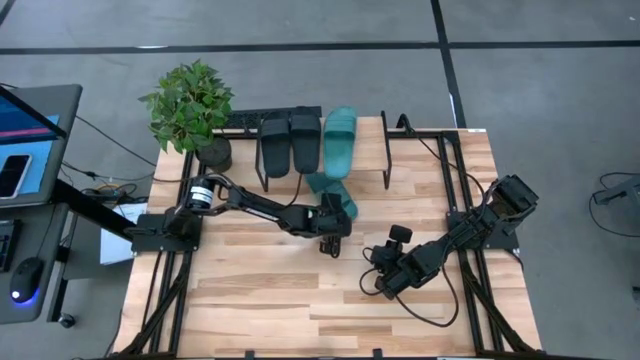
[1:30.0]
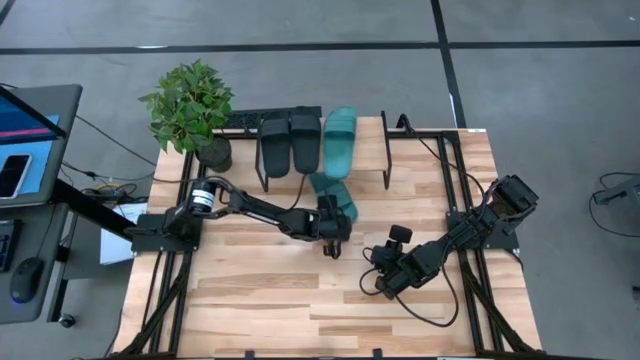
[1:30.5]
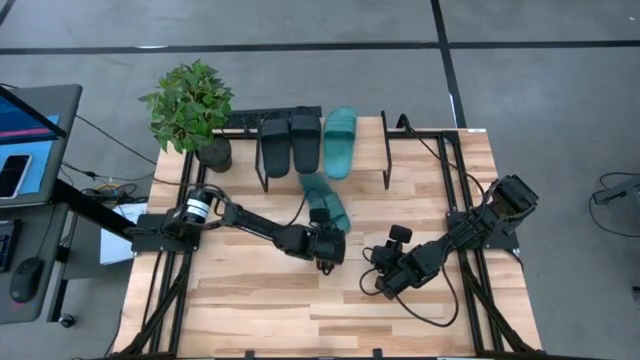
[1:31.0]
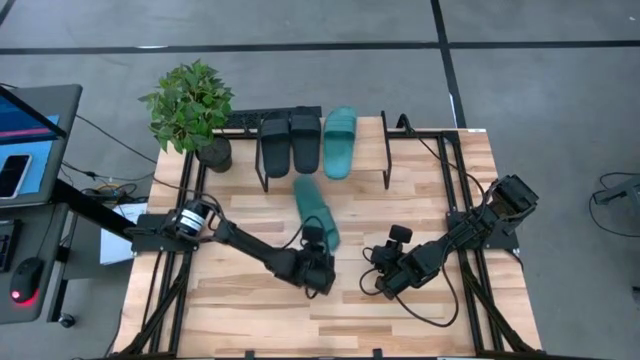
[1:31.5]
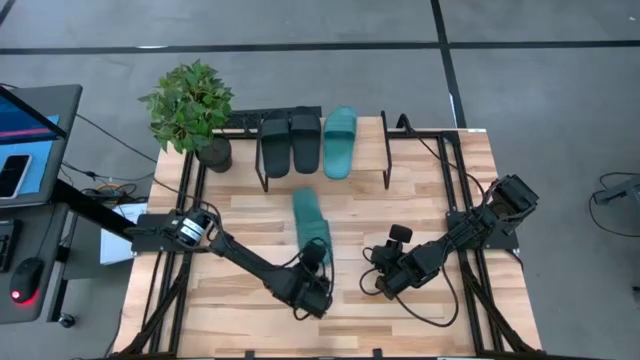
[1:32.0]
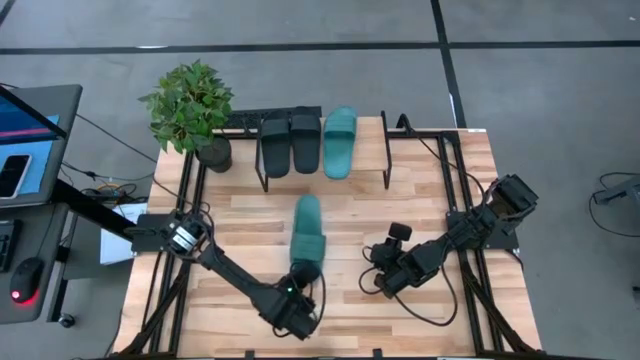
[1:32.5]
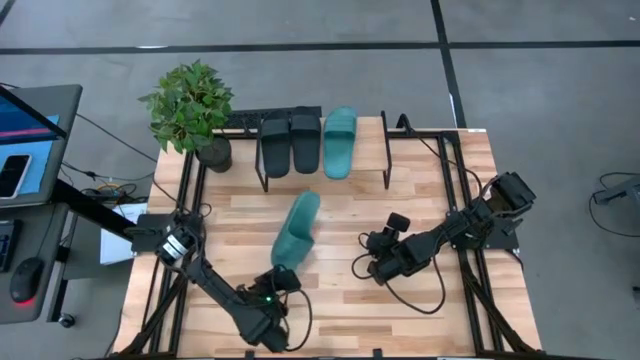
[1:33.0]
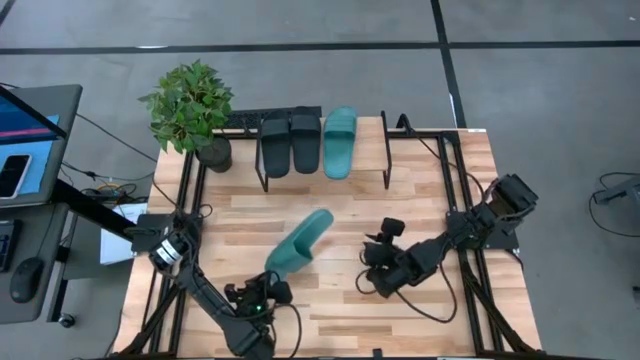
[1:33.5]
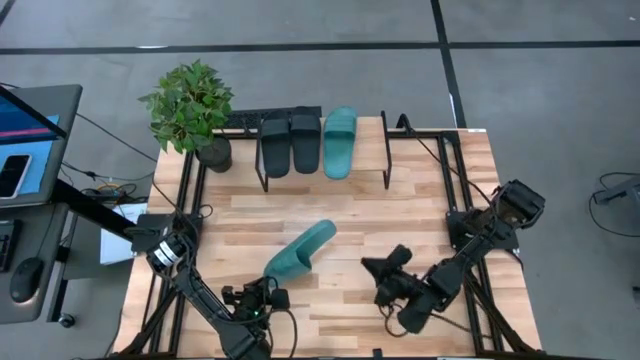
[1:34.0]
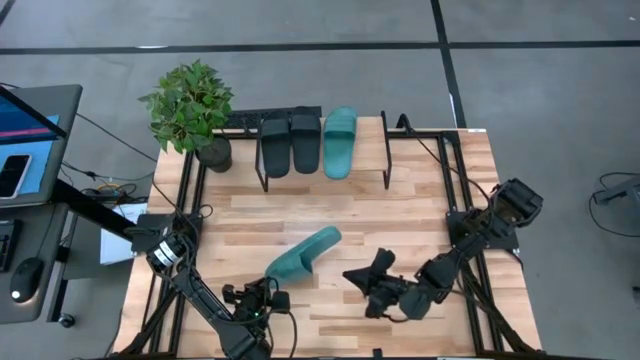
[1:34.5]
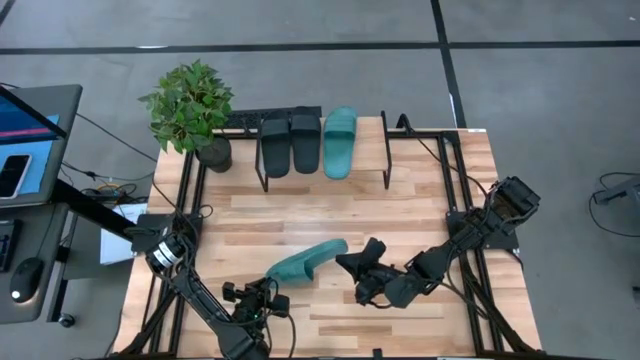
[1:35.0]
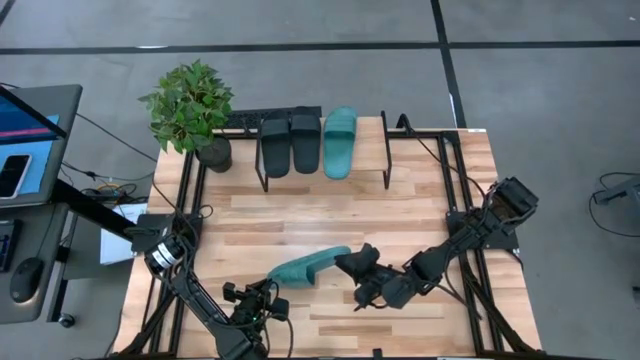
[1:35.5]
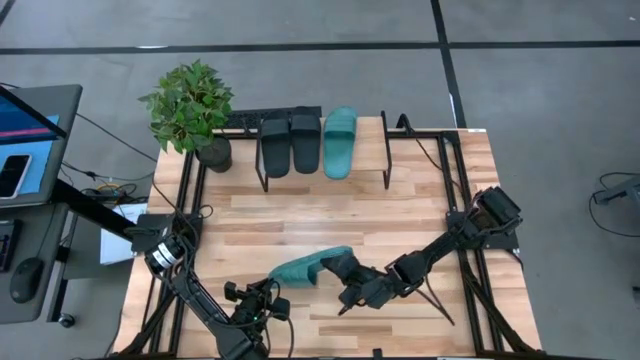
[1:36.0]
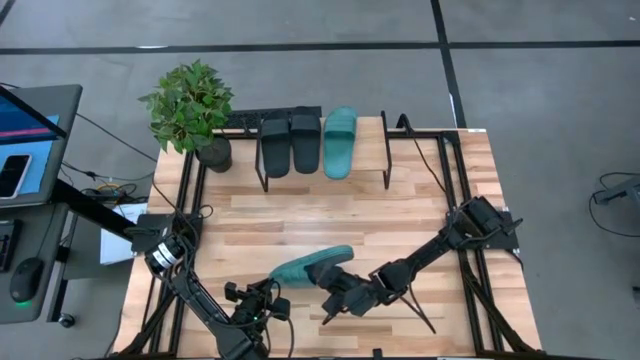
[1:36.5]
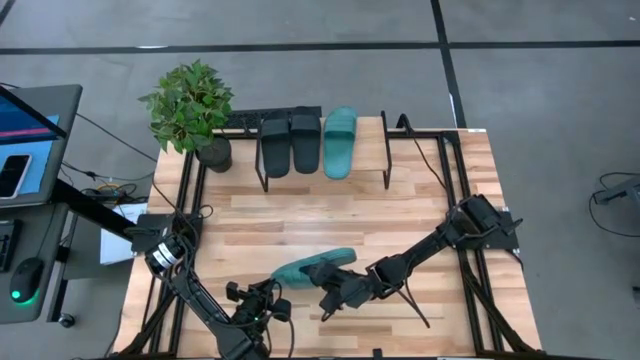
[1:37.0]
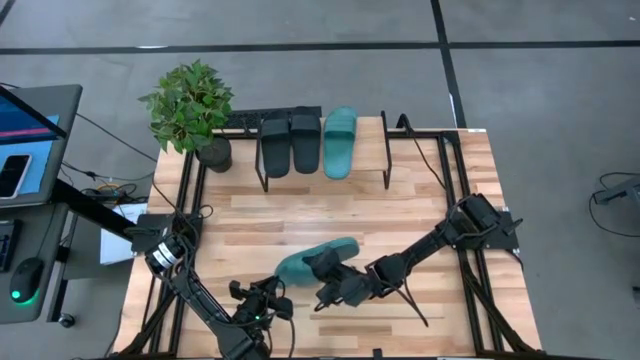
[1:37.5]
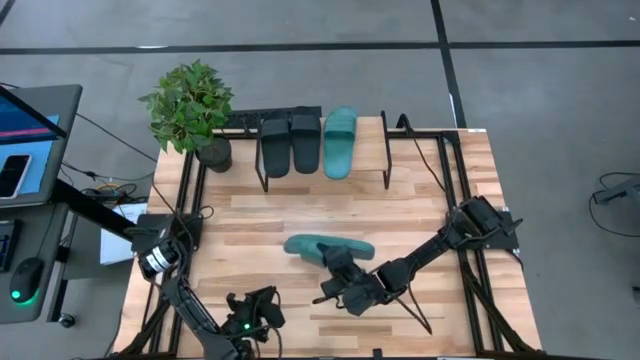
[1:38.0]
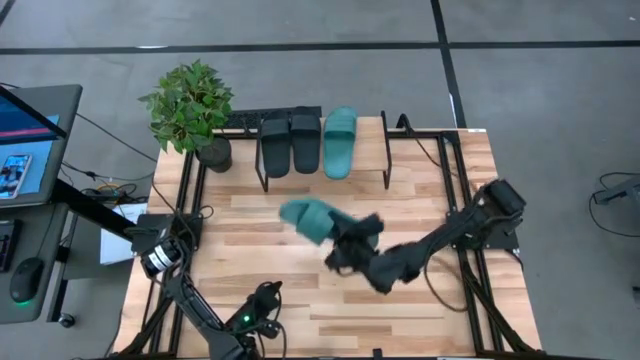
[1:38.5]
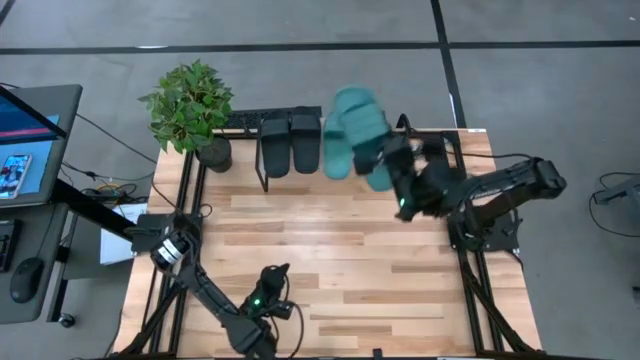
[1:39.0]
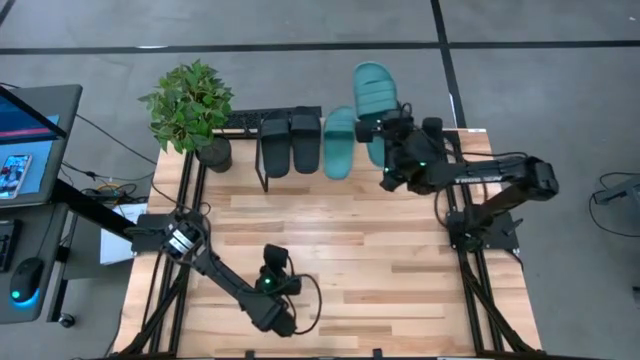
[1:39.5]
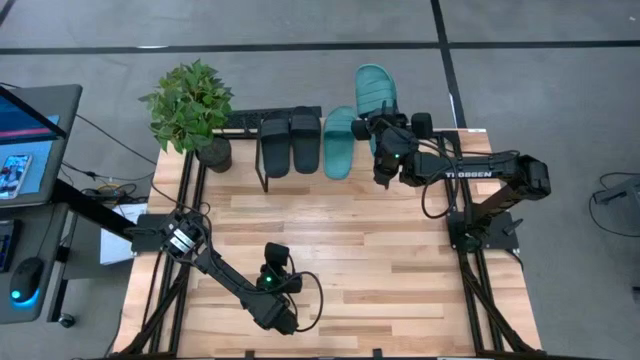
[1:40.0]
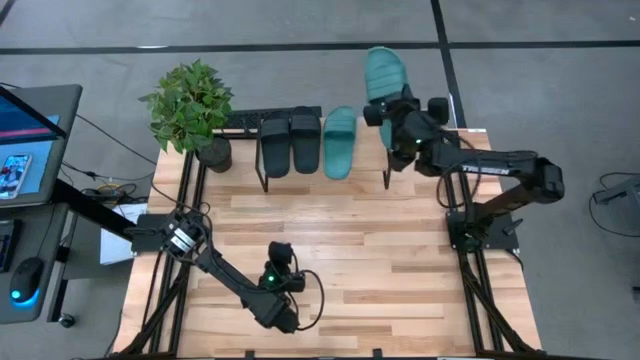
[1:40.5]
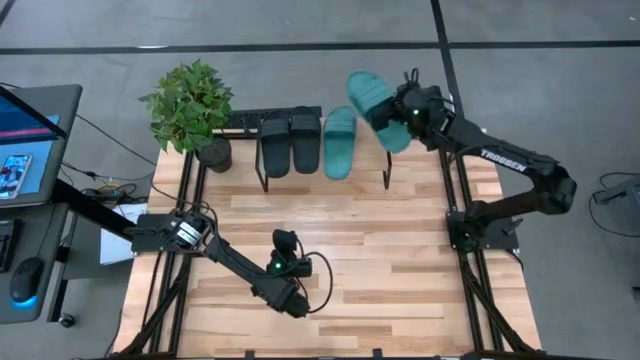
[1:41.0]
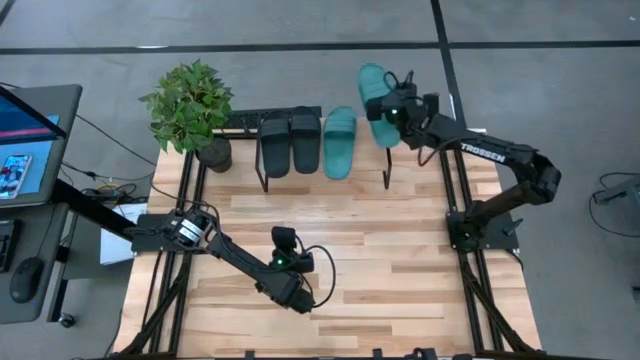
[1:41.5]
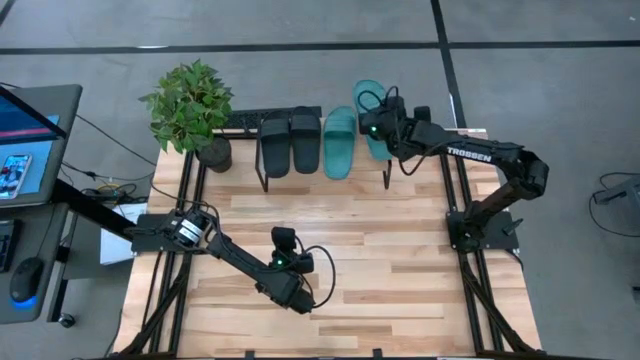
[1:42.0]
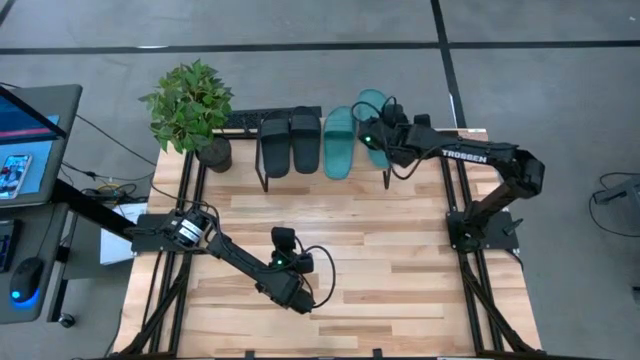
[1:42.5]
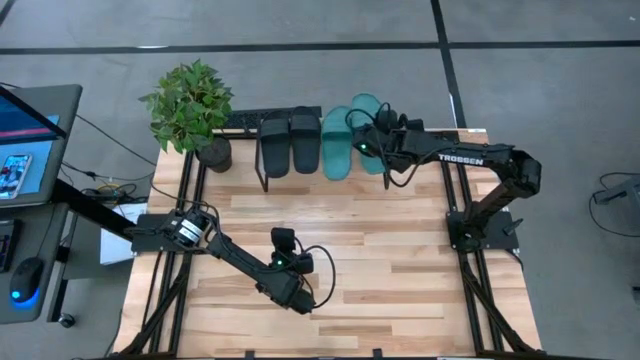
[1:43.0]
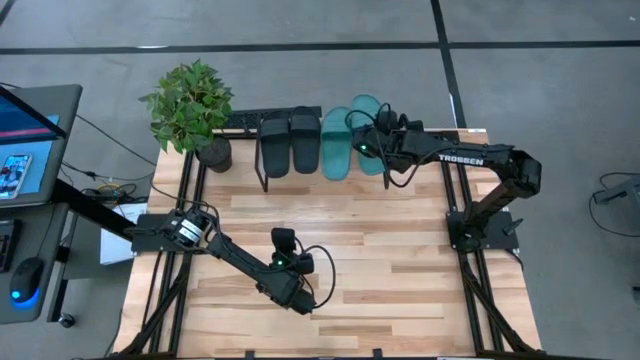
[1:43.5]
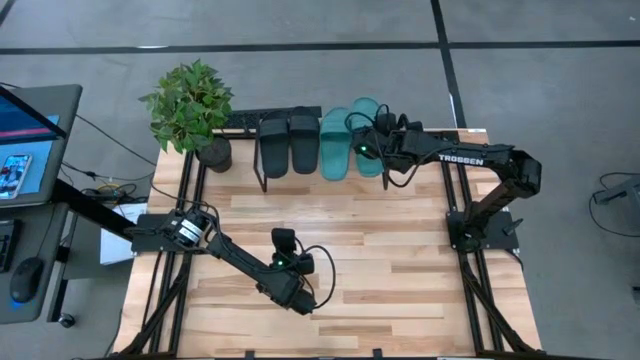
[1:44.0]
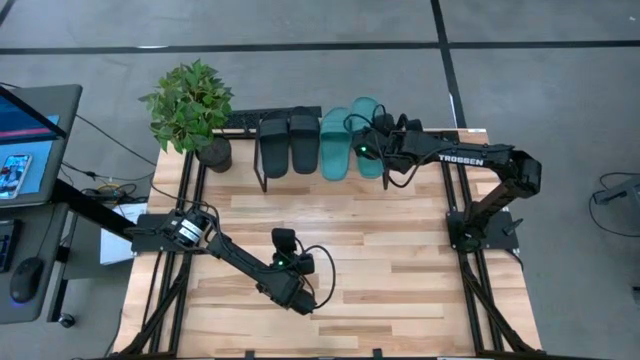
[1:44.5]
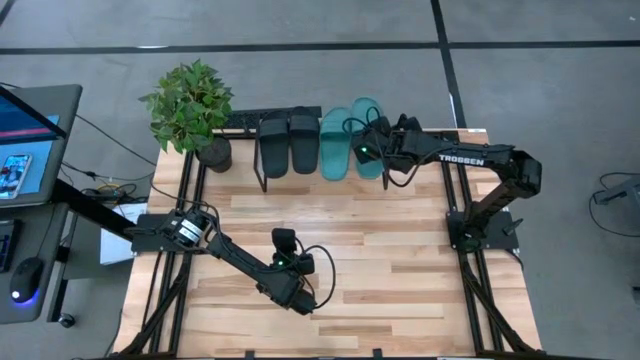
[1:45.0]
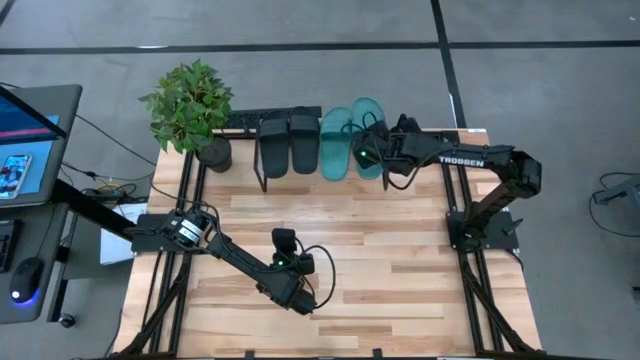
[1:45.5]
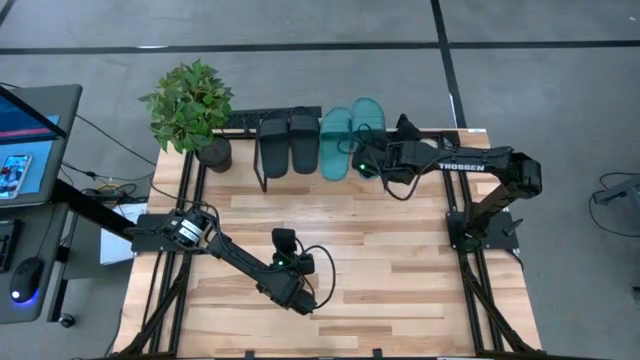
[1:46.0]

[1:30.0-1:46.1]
Task: Pick and place slides into the shelf
Put the green pair of slippers on the shelf

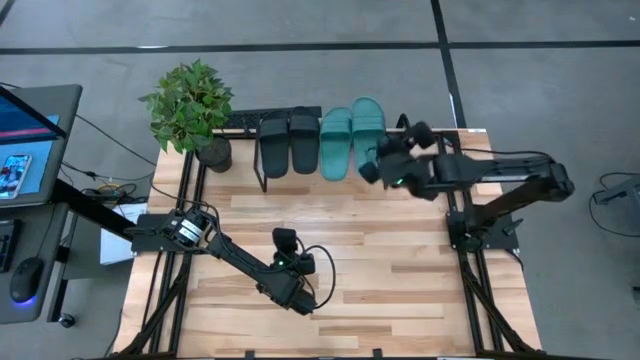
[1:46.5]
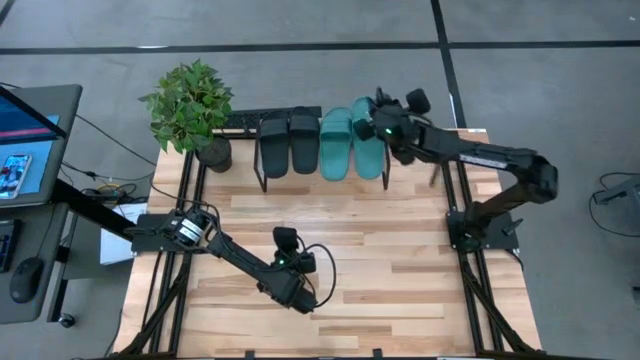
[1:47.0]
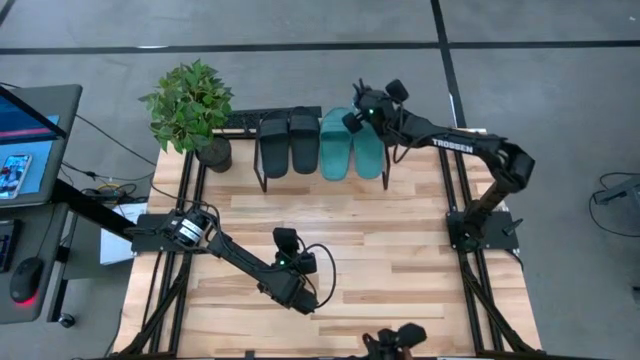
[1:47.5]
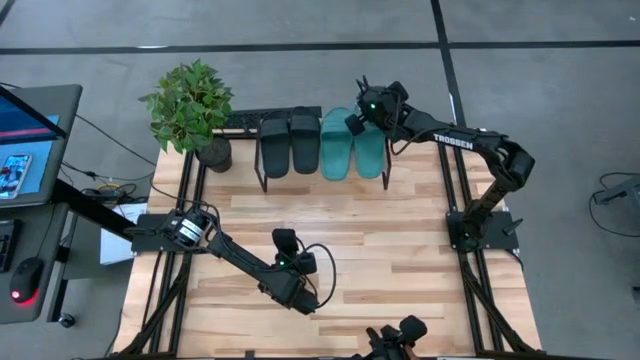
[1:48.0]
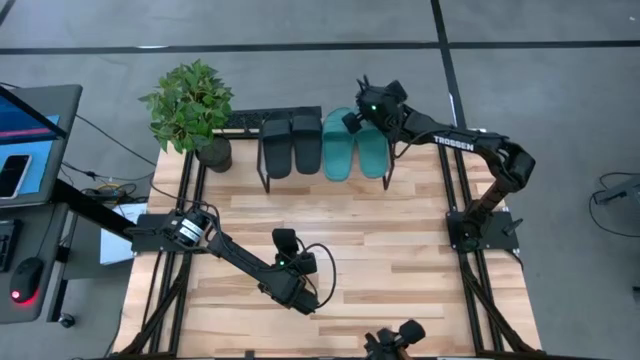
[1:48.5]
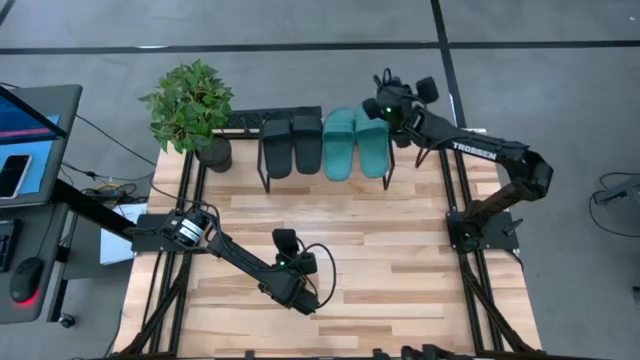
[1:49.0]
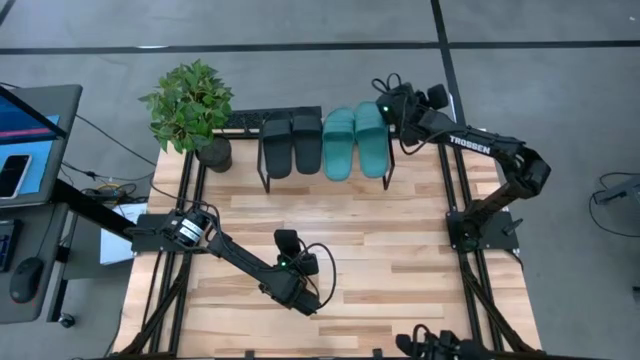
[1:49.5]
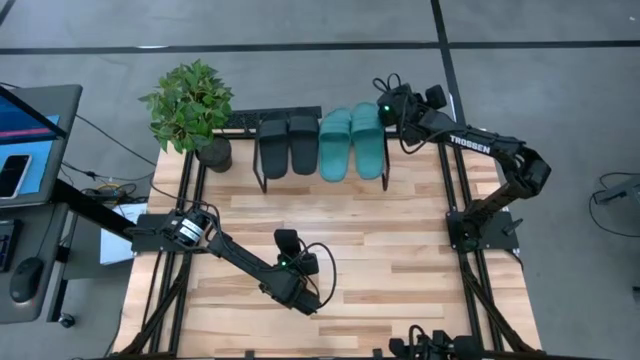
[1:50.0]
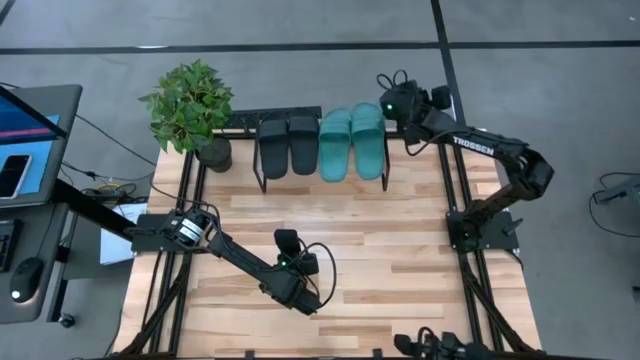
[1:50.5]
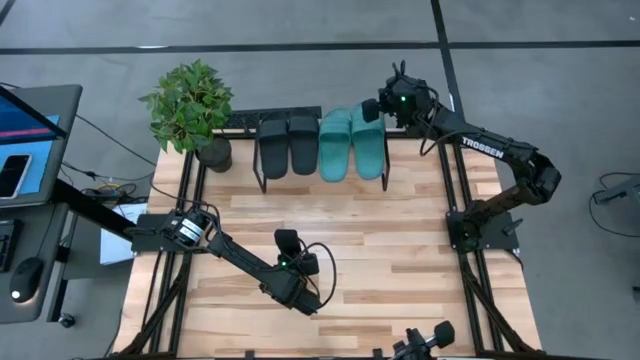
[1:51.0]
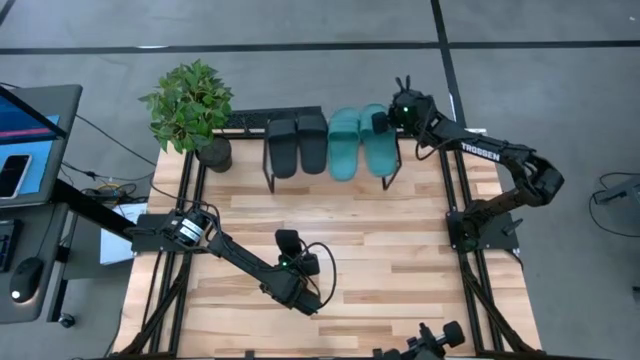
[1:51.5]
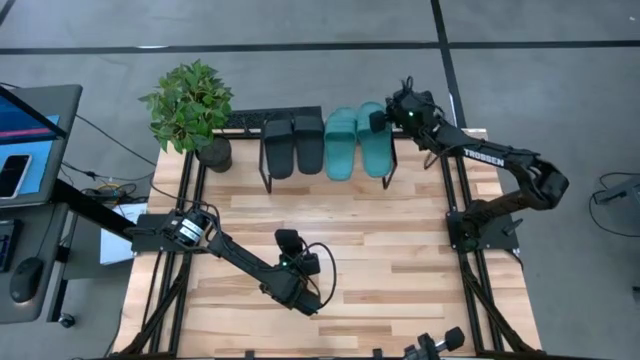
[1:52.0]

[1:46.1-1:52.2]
Adjust the green slipper on the shelf
